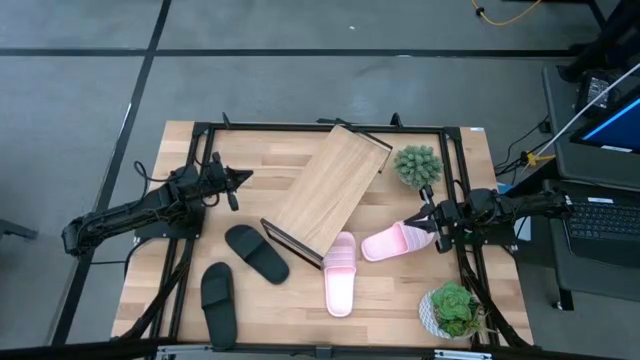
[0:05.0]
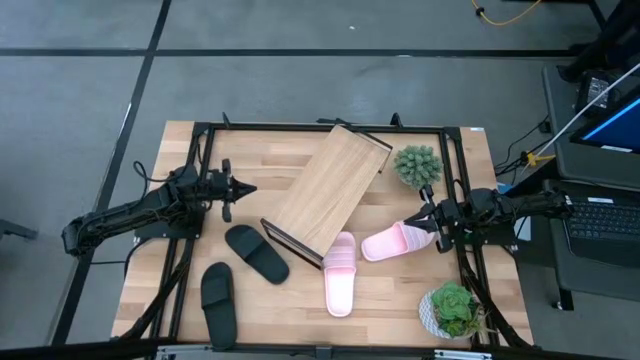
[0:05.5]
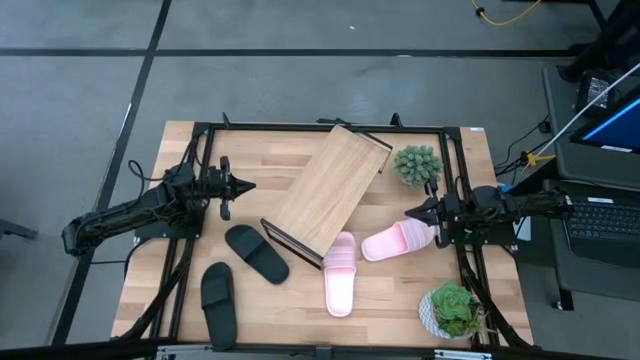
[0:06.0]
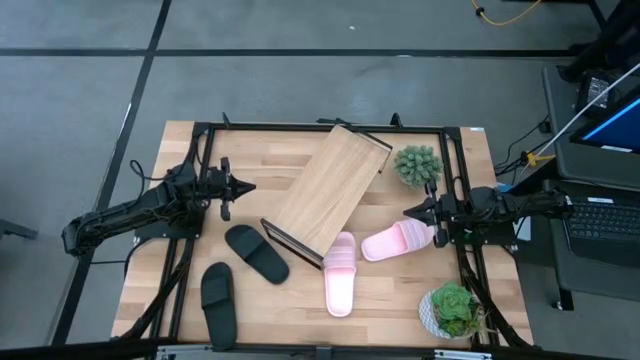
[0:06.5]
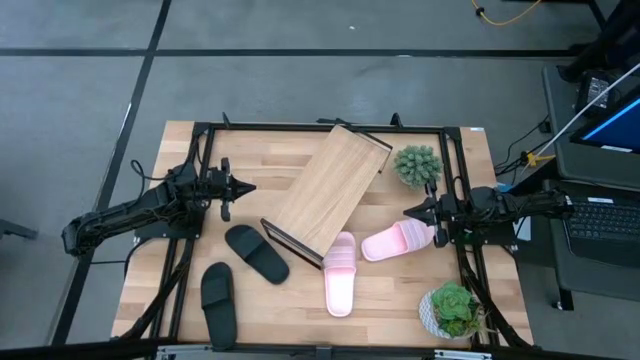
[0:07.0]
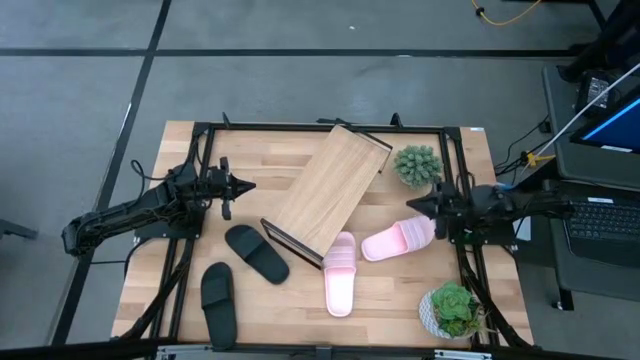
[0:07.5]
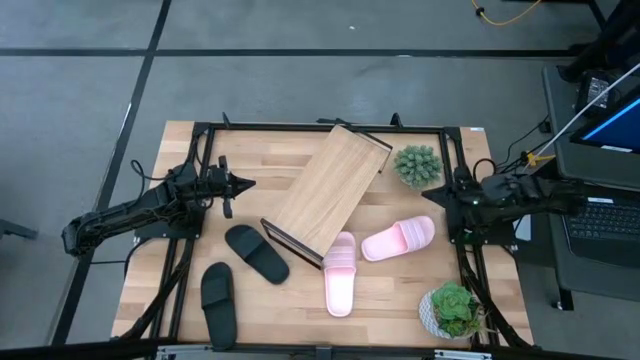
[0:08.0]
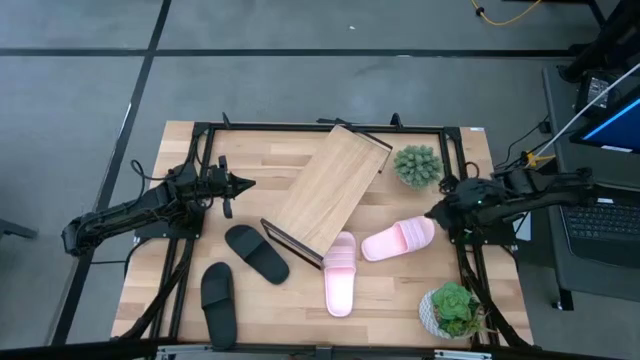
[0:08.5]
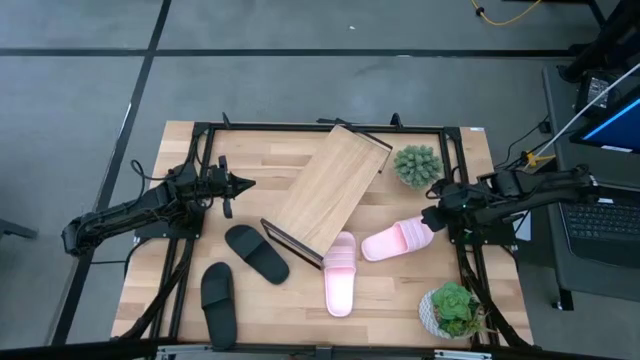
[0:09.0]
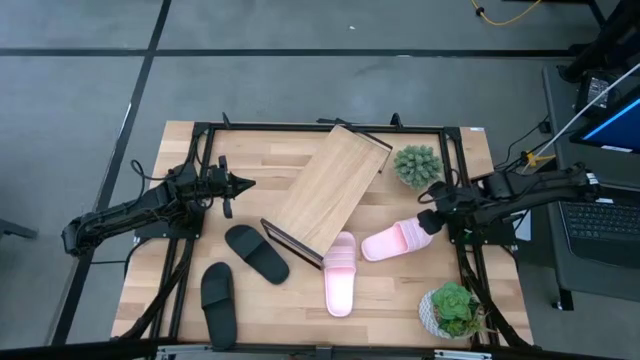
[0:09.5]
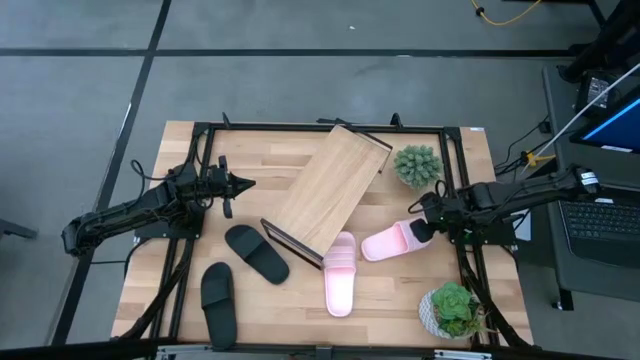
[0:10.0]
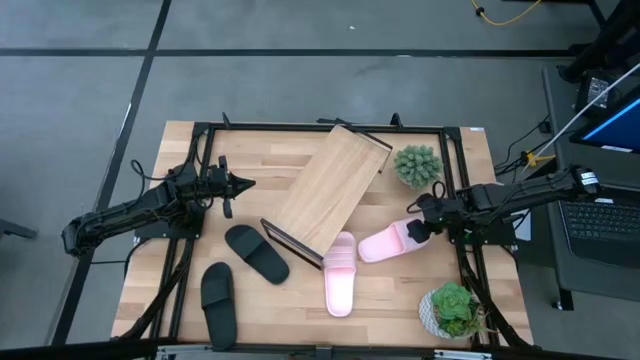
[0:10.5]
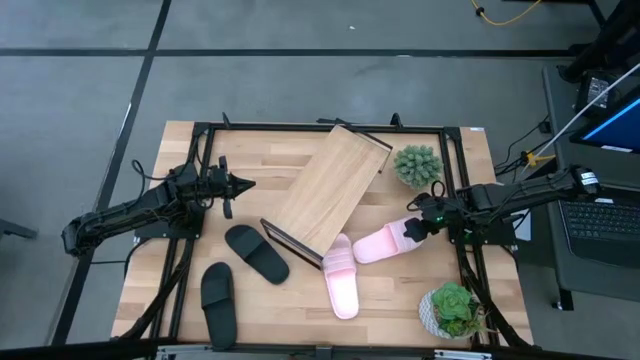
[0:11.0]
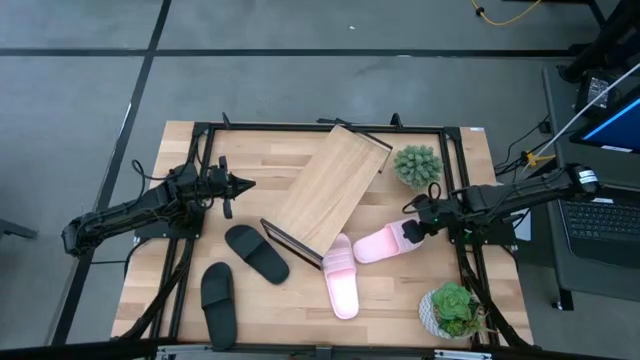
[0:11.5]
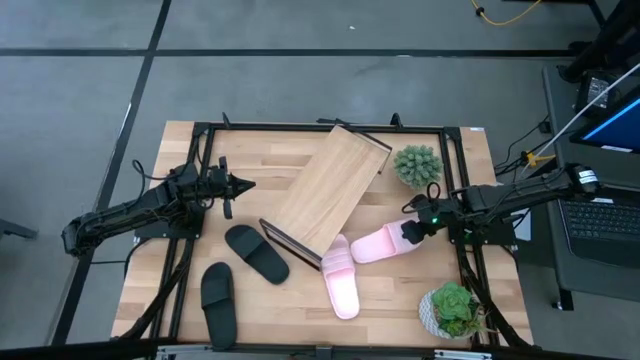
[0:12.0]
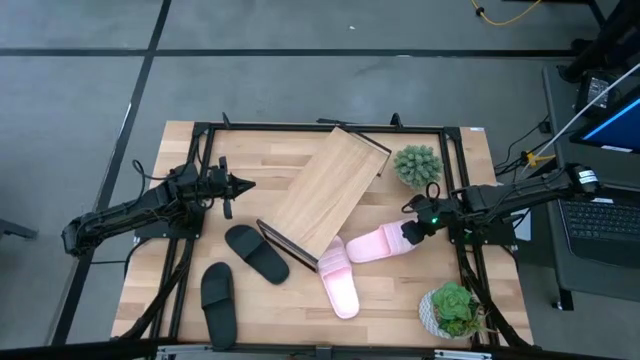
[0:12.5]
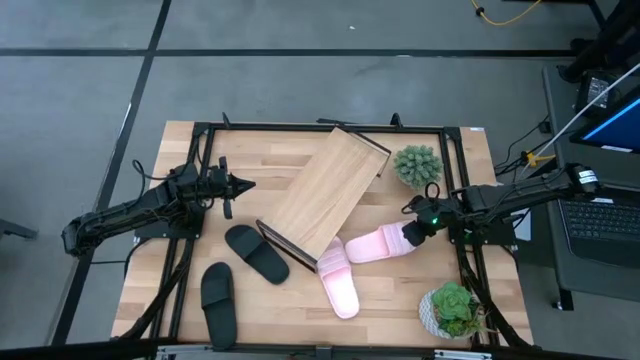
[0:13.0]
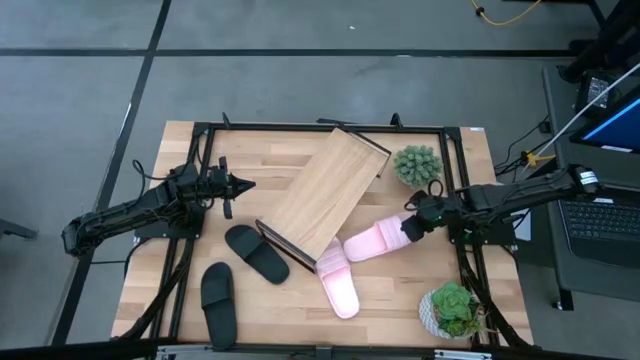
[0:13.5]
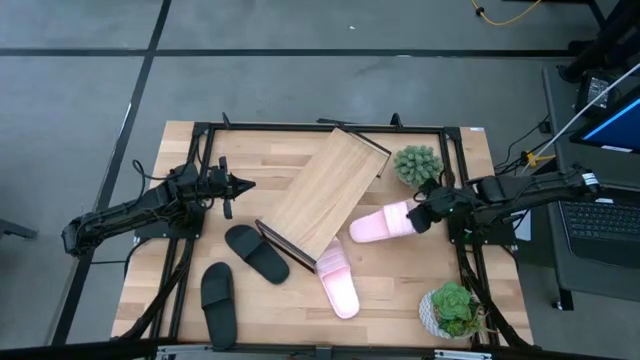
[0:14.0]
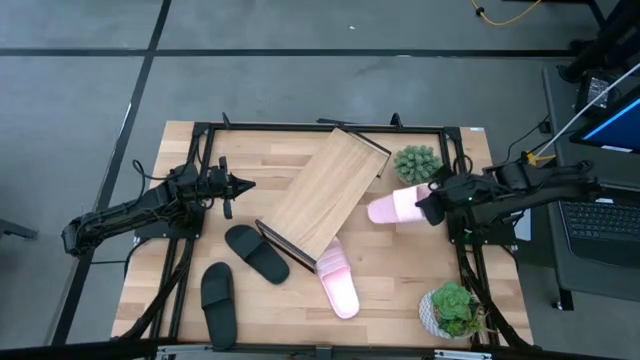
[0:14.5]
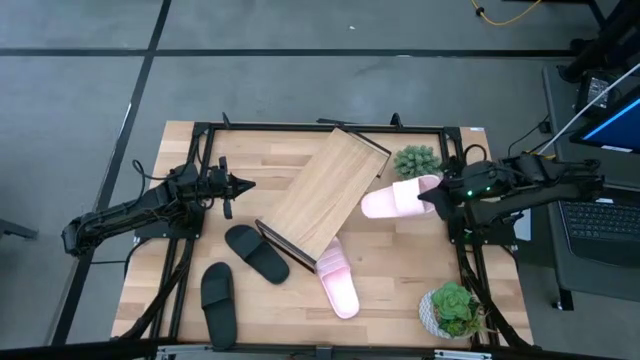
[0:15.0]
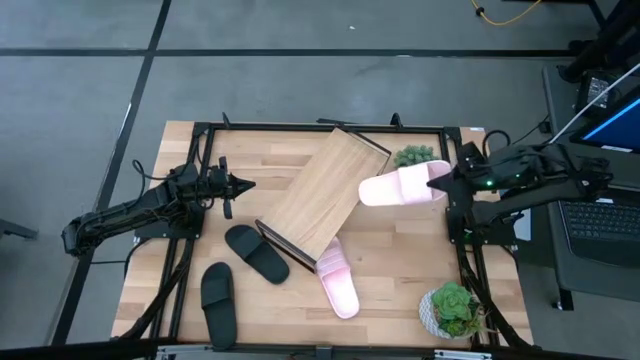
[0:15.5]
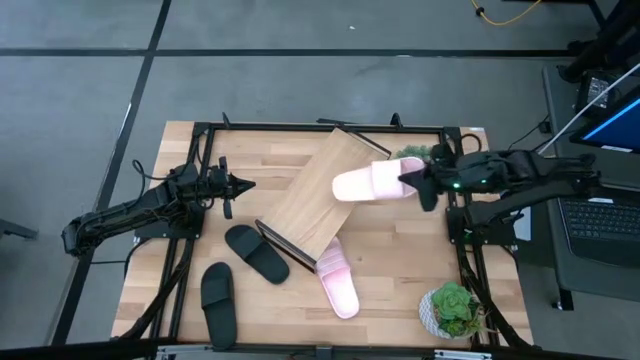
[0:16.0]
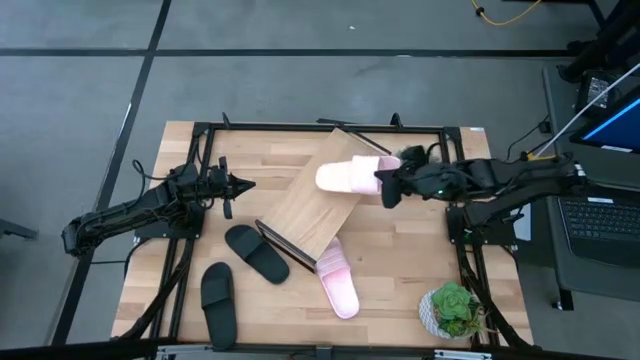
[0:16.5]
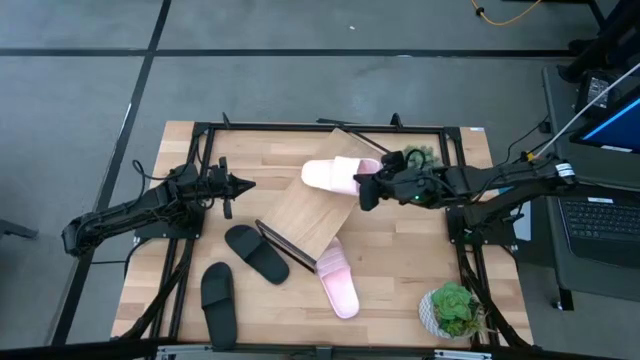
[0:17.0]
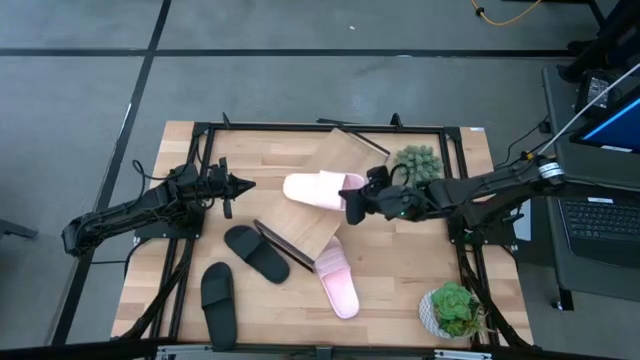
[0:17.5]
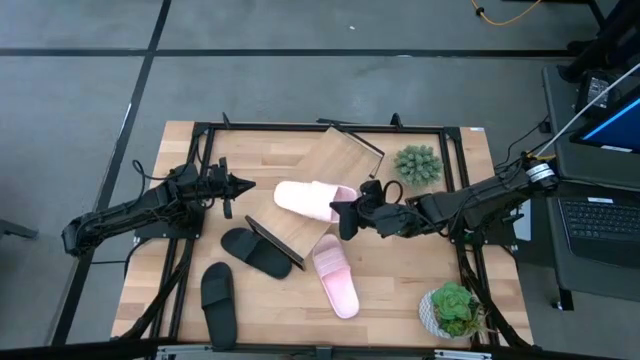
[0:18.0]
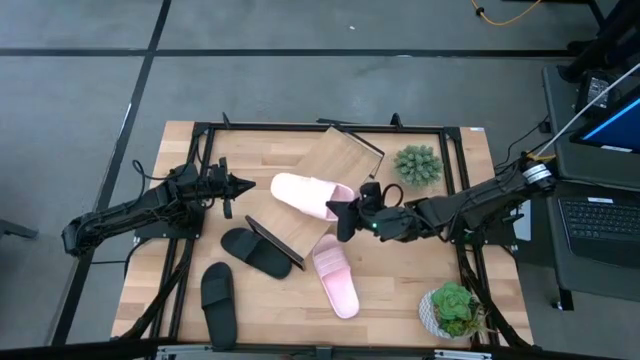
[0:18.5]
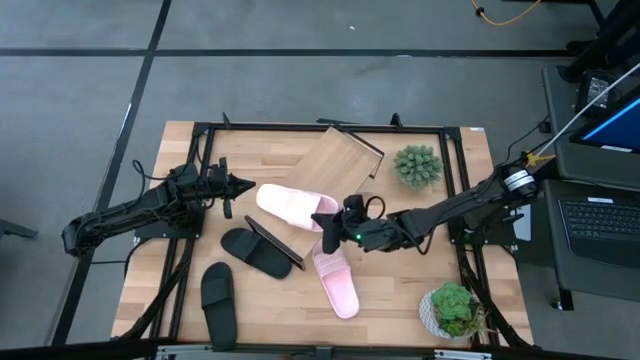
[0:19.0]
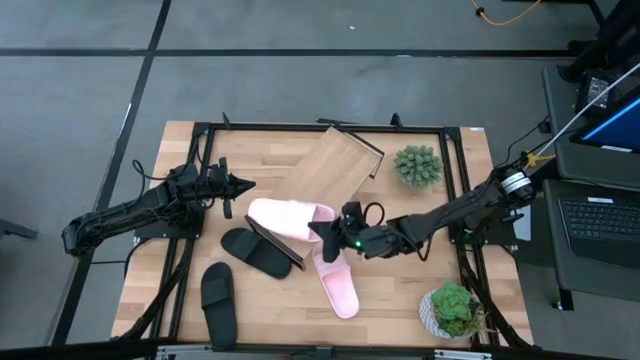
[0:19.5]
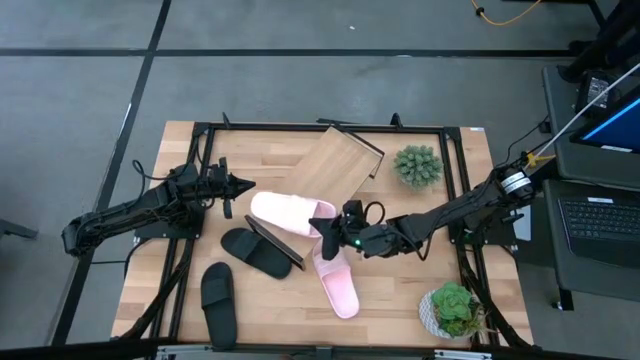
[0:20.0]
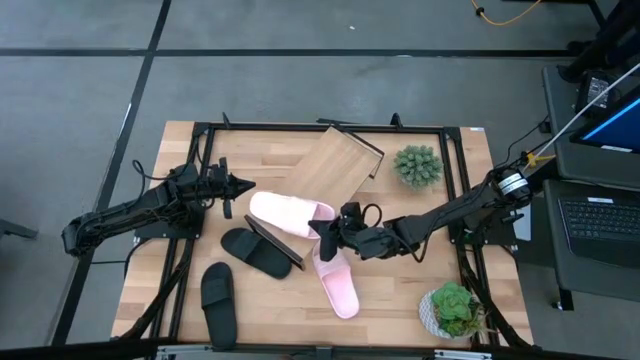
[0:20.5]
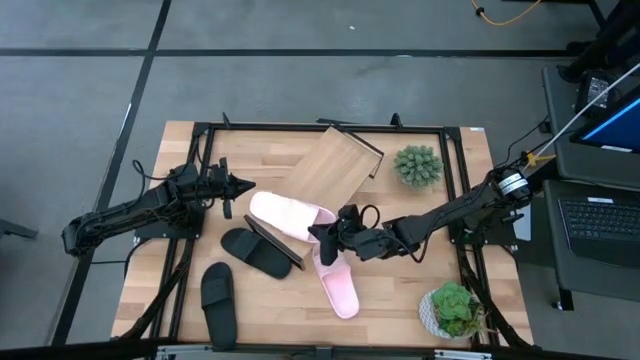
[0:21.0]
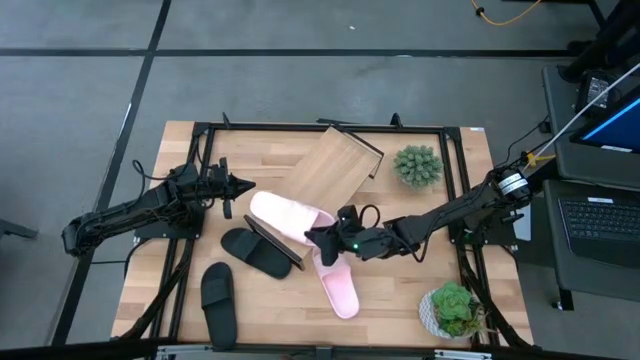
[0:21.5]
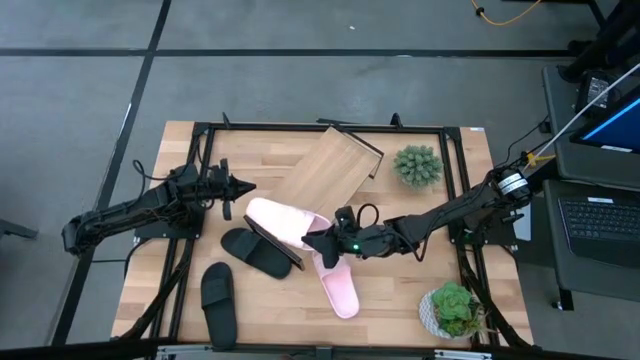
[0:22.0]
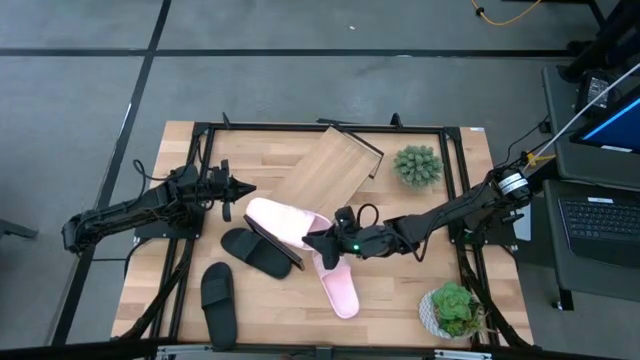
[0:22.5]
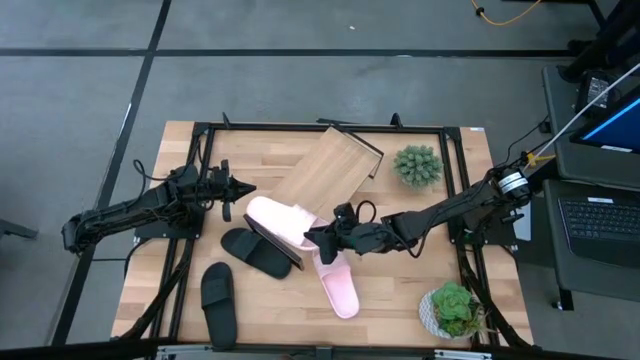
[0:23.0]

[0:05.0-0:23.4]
Task: Pick and place slides into the shelf
Put the right pink slides on the shelf

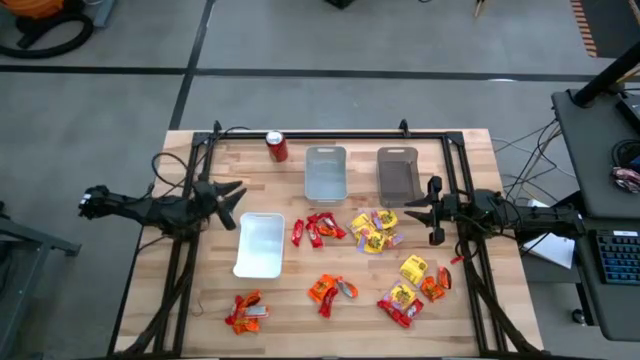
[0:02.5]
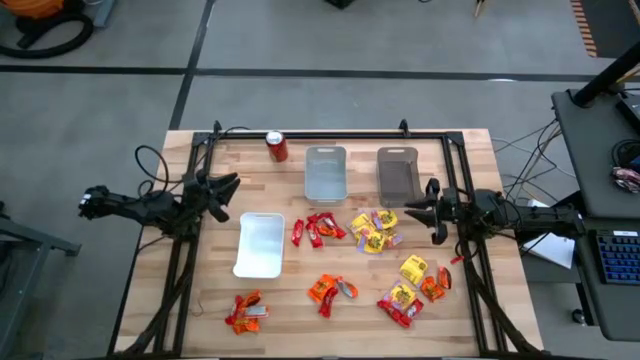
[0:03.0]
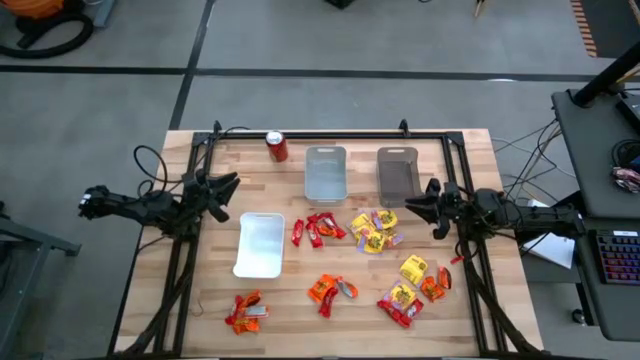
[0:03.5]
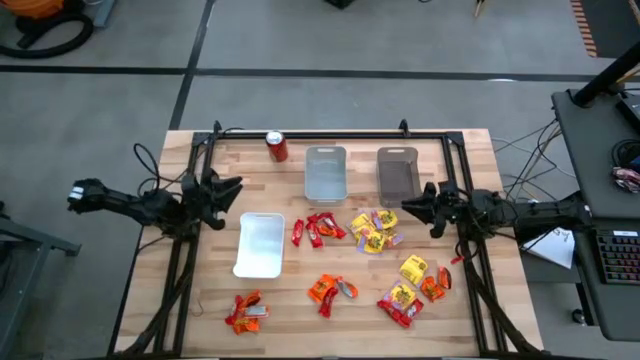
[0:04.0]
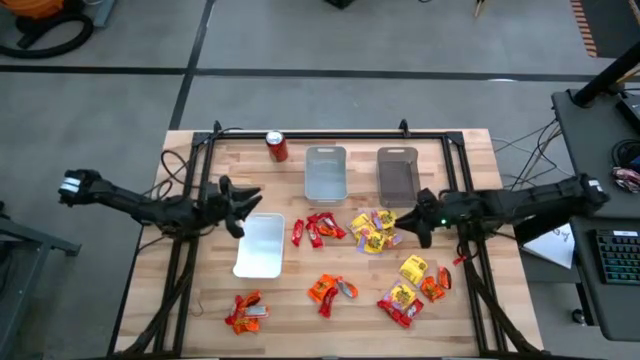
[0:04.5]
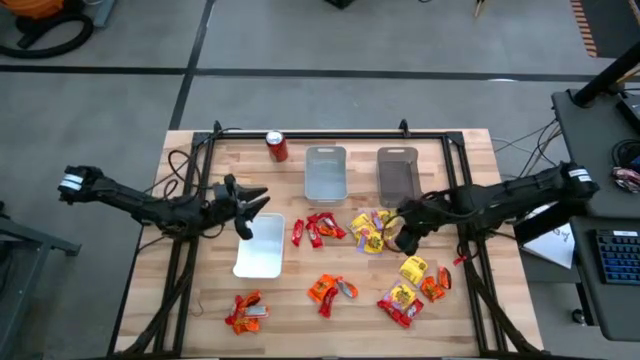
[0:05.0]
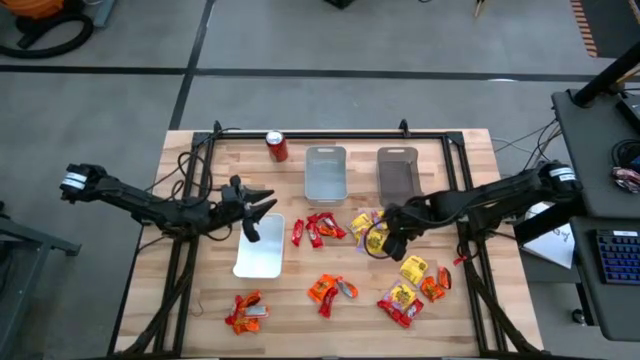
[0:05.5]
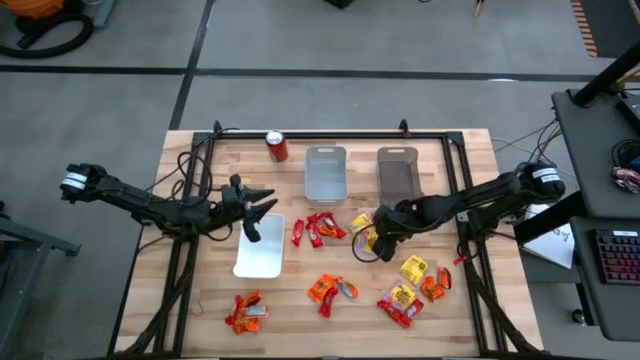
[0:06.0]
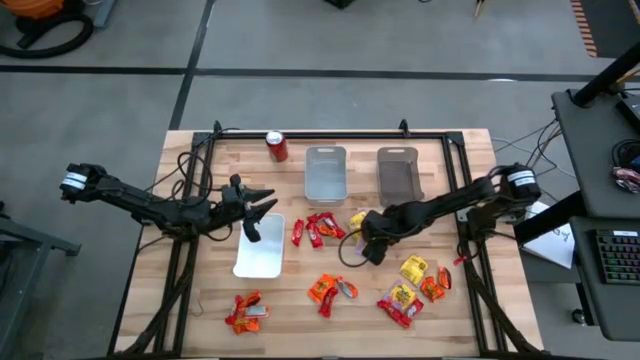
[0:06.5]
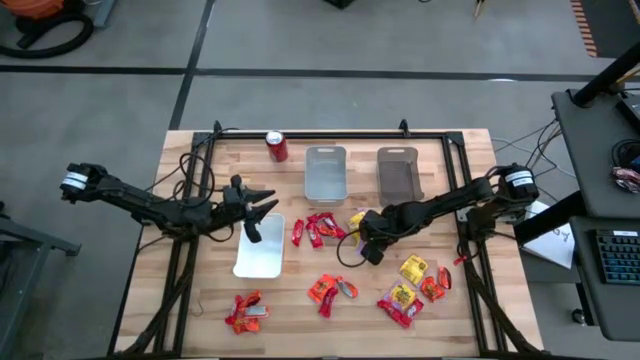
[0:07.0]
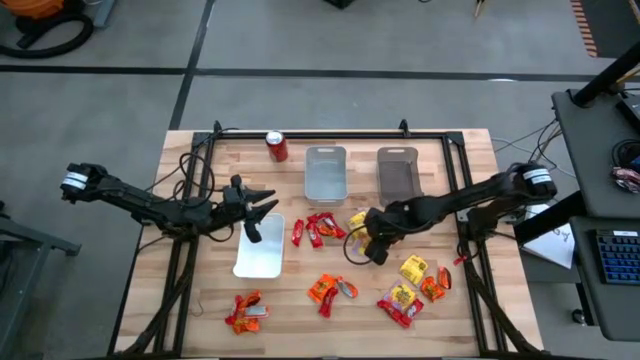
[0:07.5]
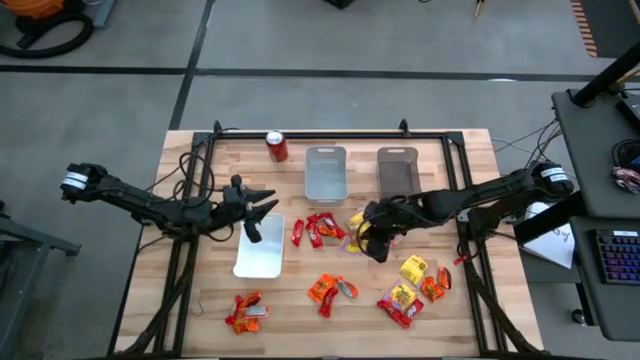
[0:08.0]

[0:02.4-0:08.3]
Task: Sort candy
Put the yellow candy into the gray bin
